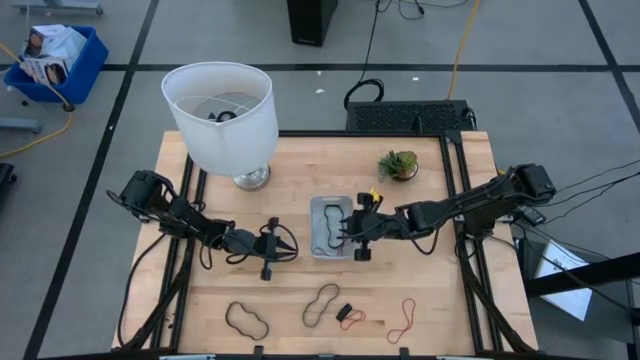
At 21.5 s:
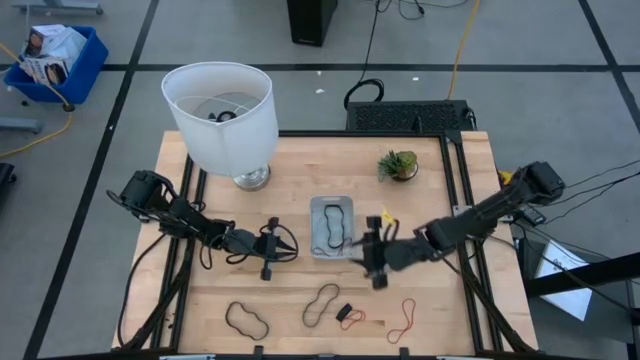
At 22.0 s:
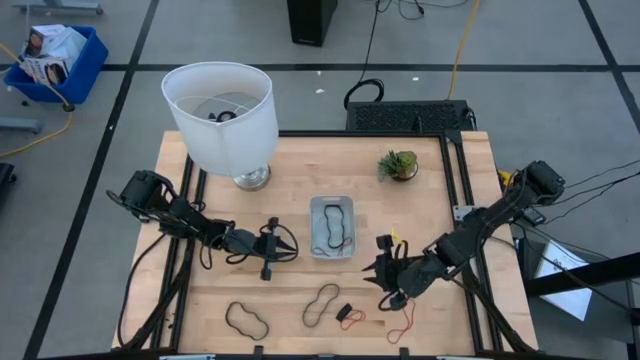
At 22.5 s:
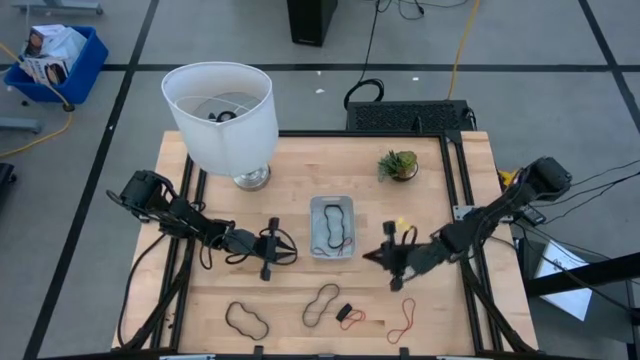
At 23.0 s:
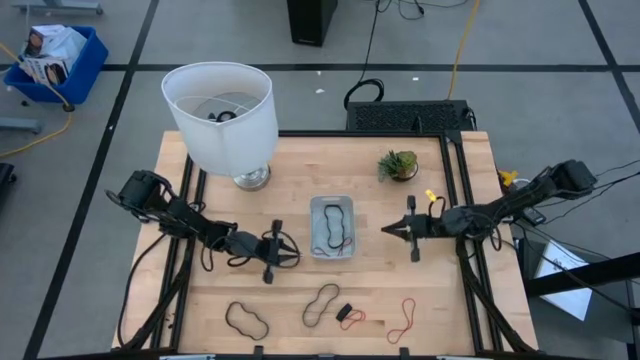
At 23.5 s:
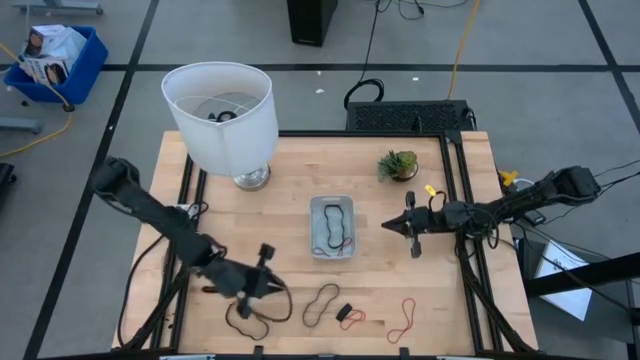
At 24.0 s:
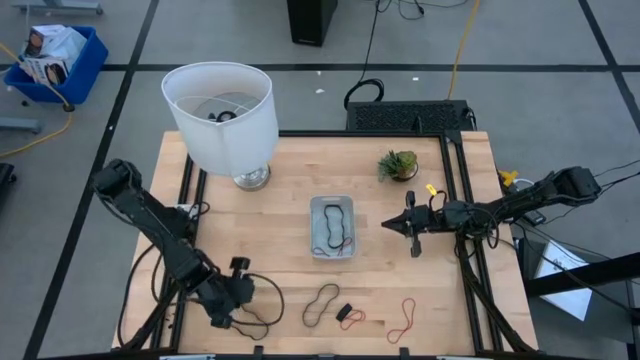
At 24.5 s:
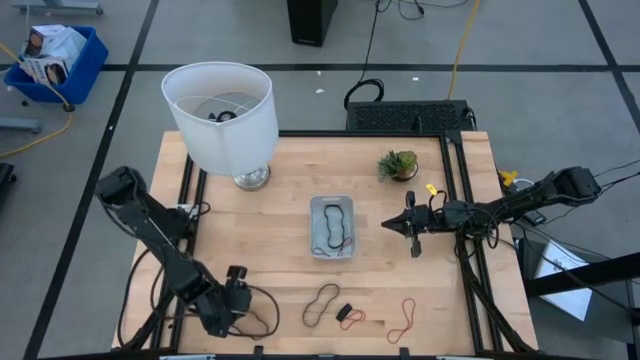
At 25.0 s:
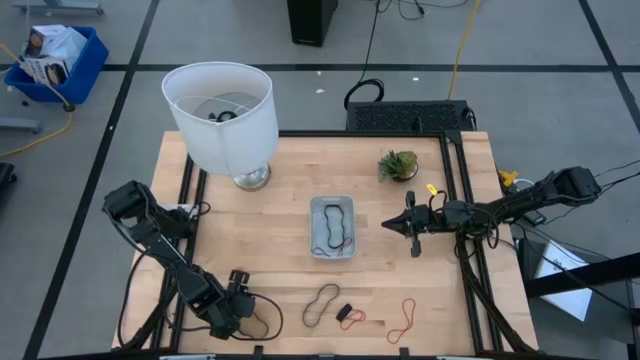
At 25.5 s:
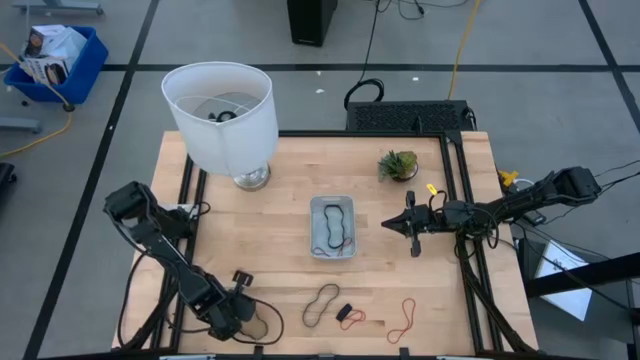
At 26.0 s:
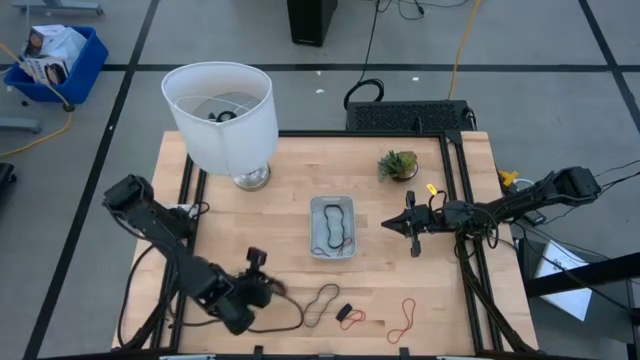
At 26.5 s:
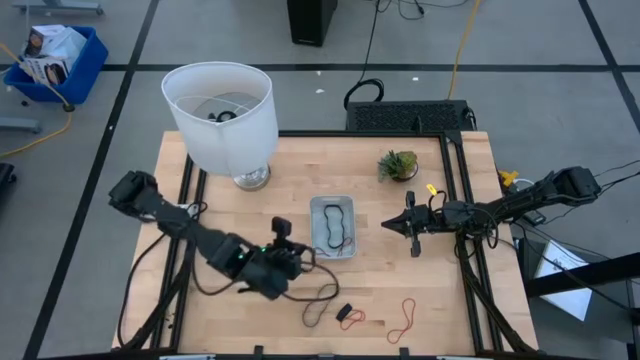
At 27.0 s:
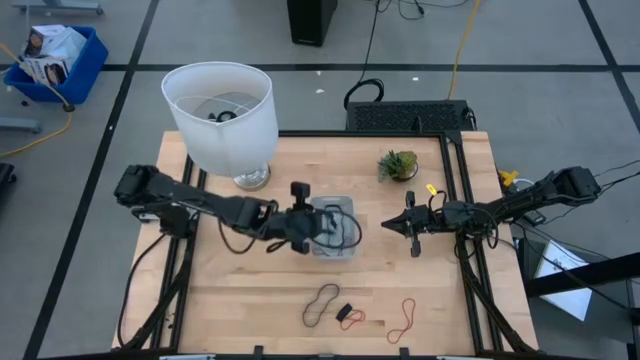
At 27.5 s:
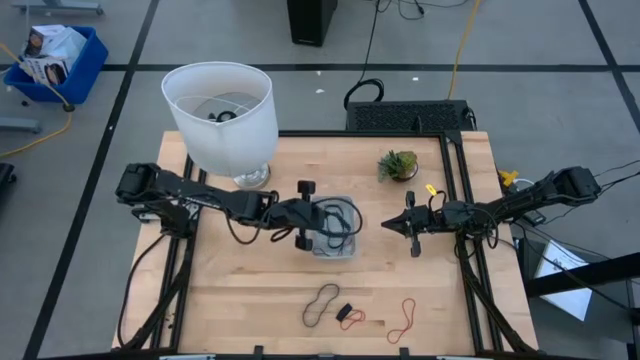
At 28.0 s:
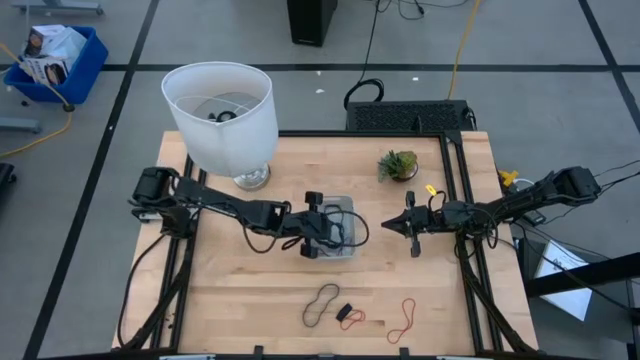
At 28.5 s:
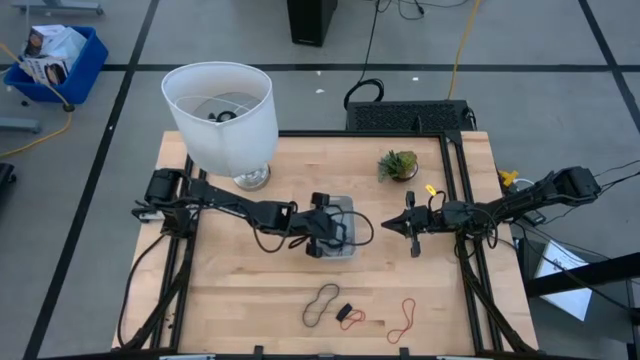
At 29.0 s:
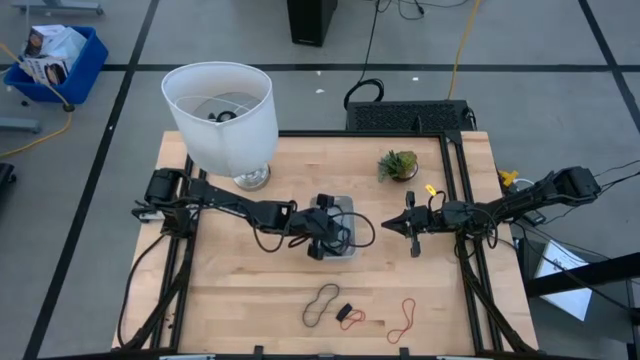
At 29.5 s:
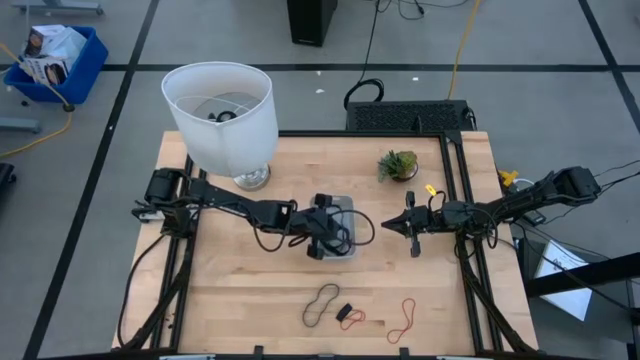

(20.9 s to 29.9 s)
Task: Pick and place rubber bands into bin
Put the black rubber band into the gray bin

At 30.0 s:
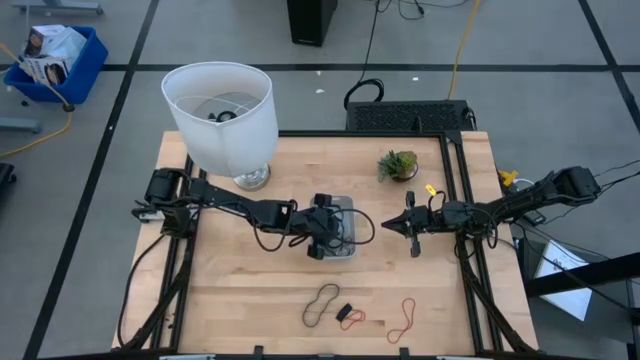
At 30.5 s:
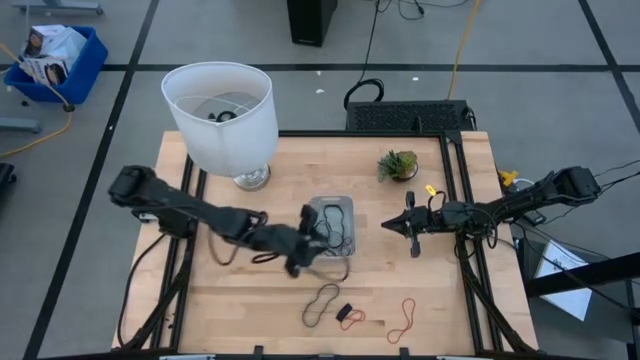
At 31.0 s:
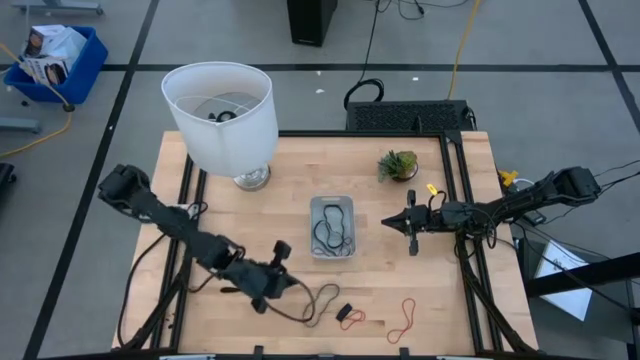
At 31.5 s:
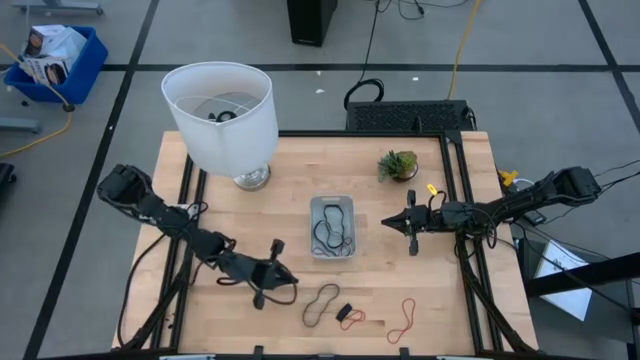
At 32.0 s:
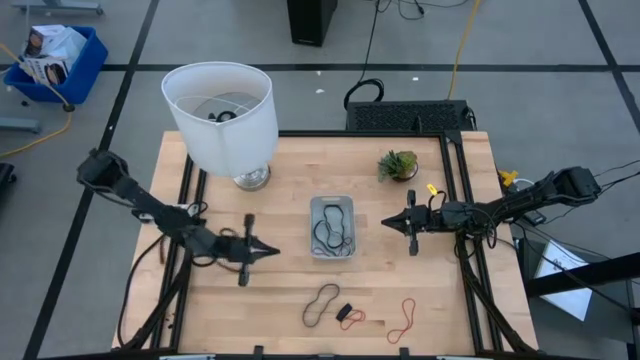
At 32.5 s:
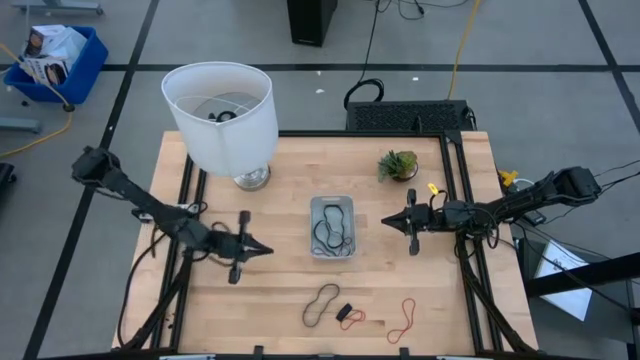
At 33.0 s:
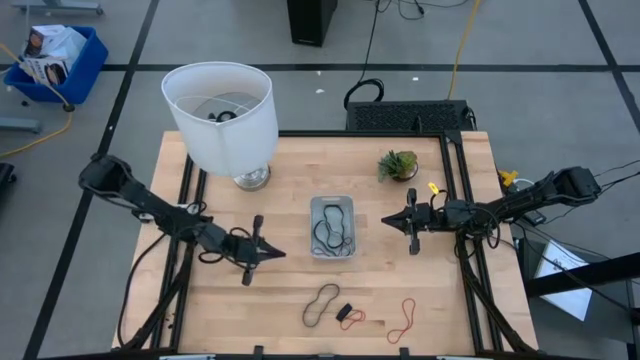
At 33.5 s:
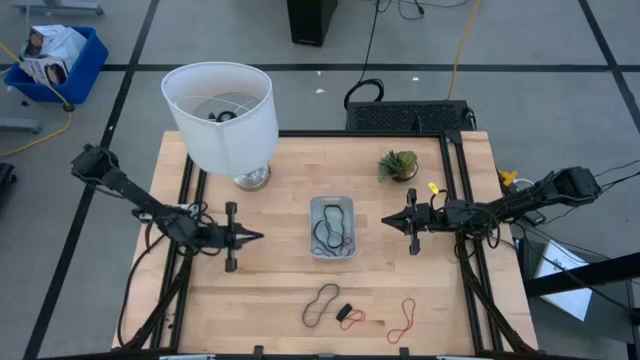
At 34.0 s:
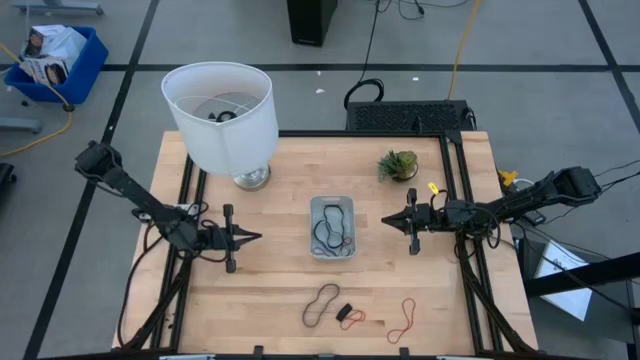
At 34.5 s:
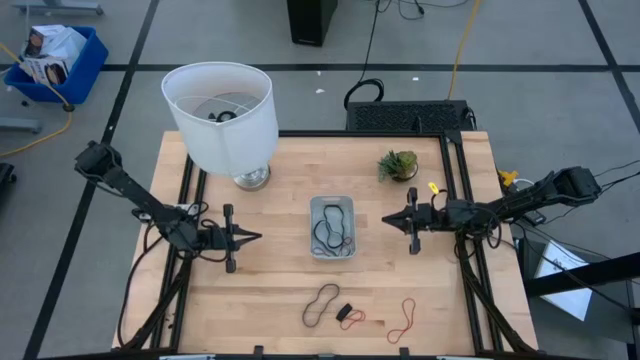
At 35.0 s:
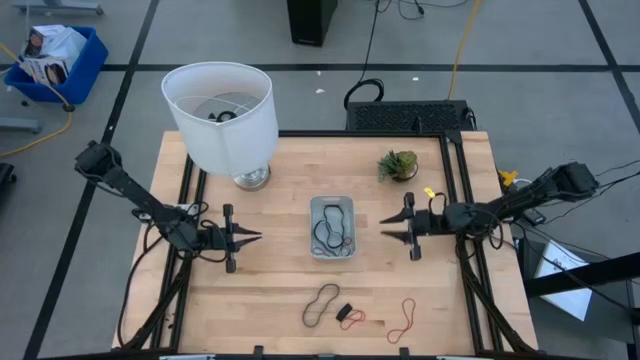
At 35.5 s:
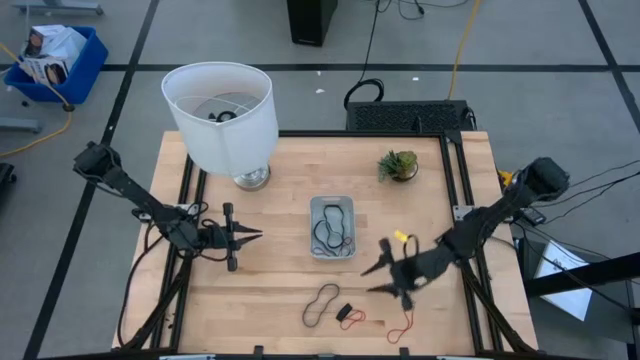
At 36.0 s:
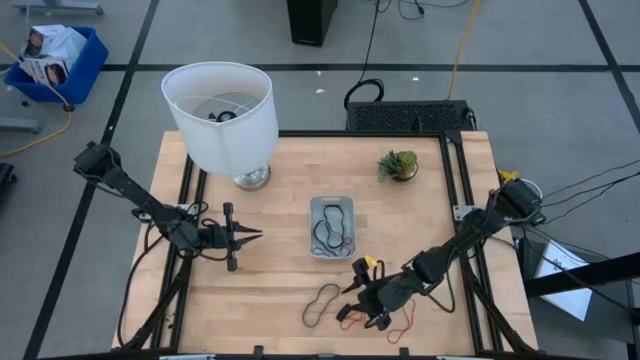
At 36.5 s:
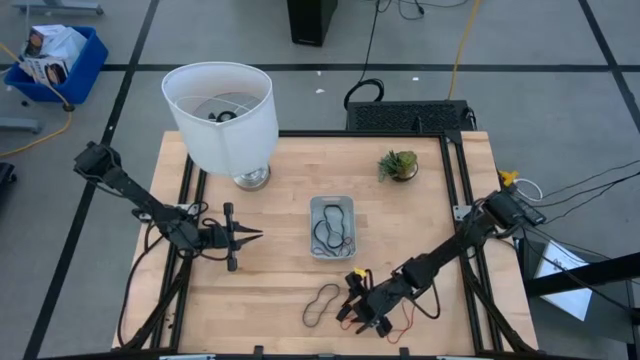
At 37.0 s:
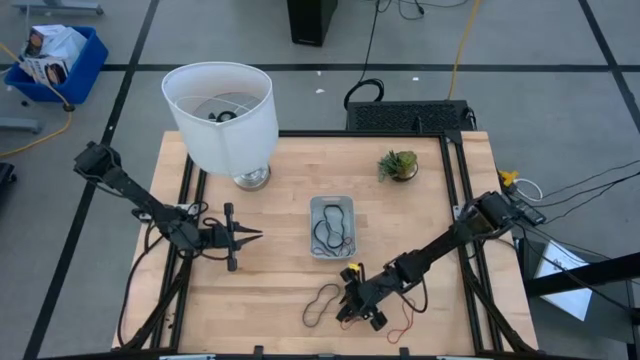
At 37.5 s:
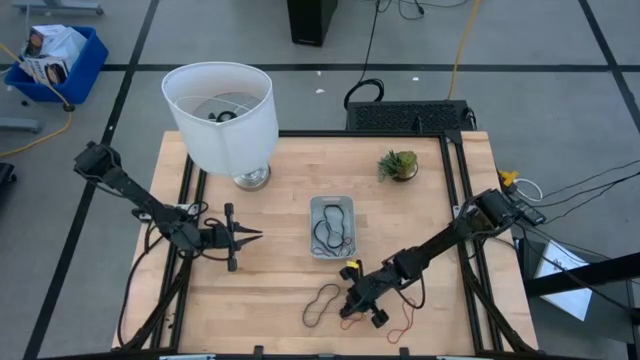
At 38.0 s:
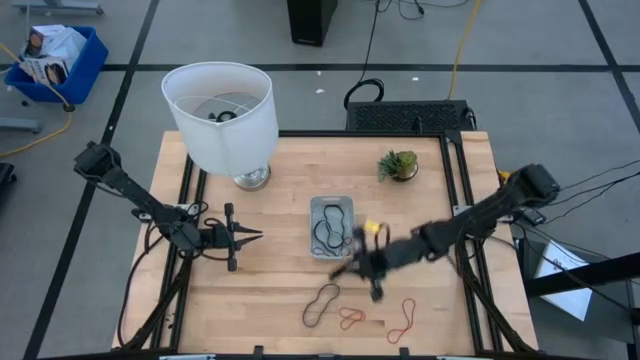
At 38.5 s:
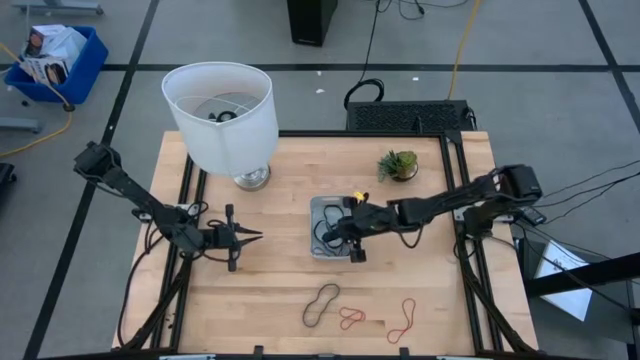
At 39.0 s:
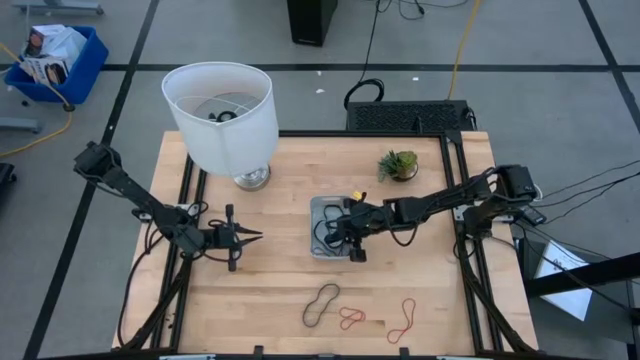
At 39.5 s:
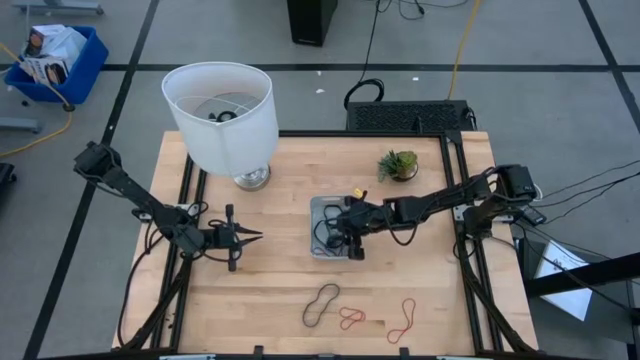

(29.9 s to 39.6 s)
Put the black rubber band into the gray bin

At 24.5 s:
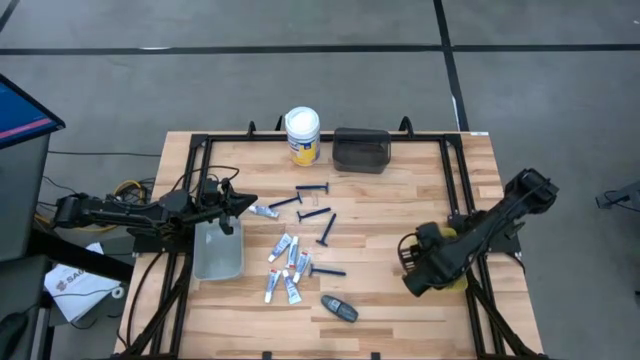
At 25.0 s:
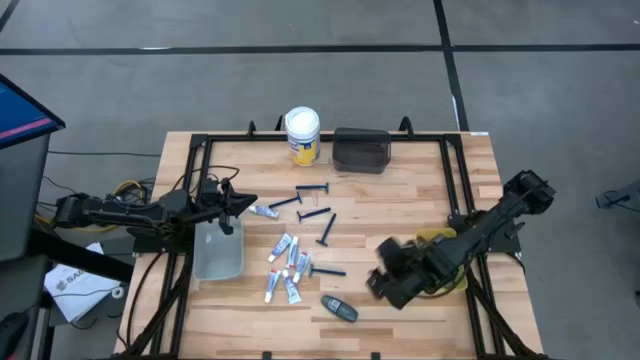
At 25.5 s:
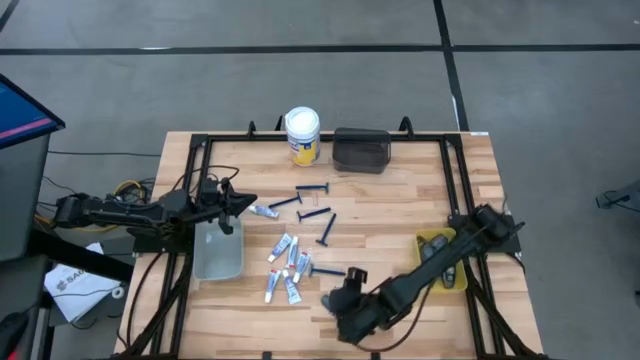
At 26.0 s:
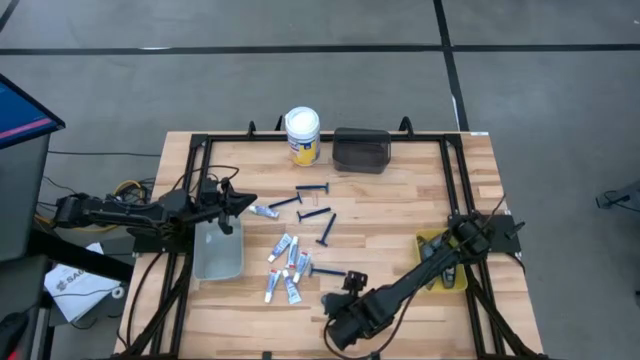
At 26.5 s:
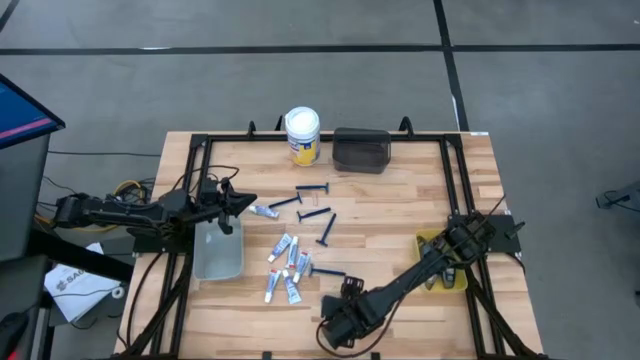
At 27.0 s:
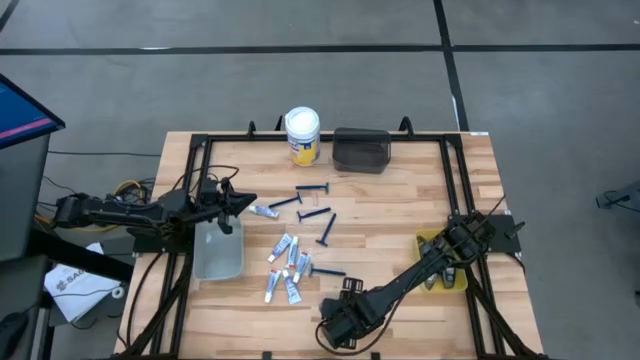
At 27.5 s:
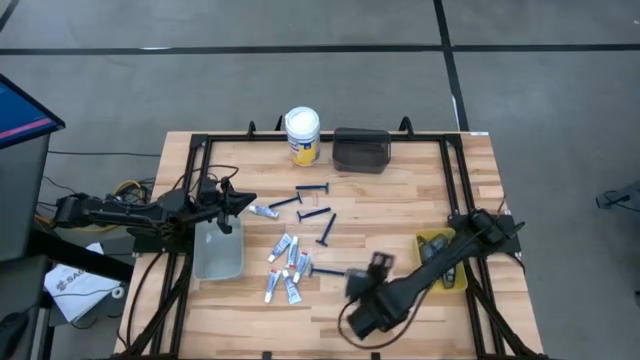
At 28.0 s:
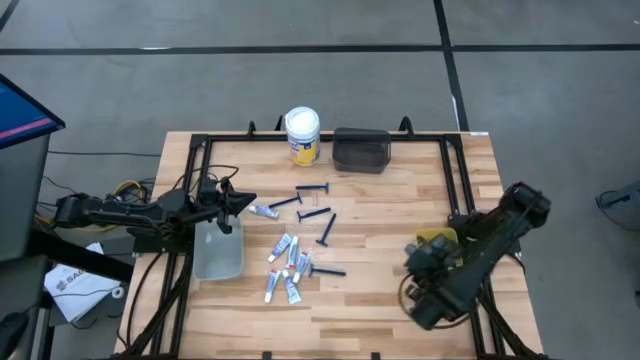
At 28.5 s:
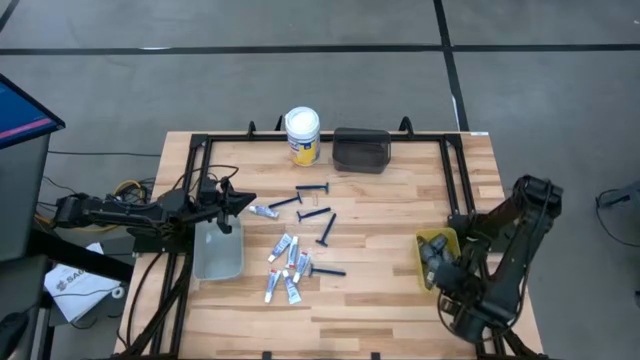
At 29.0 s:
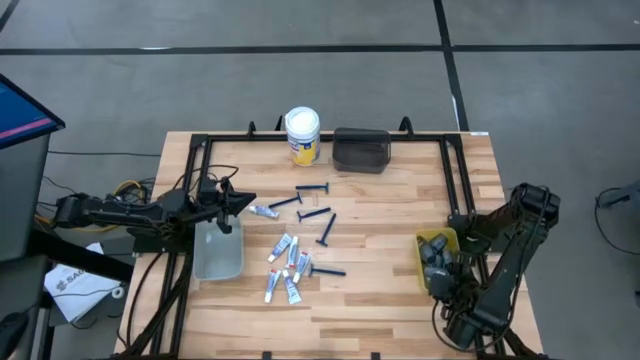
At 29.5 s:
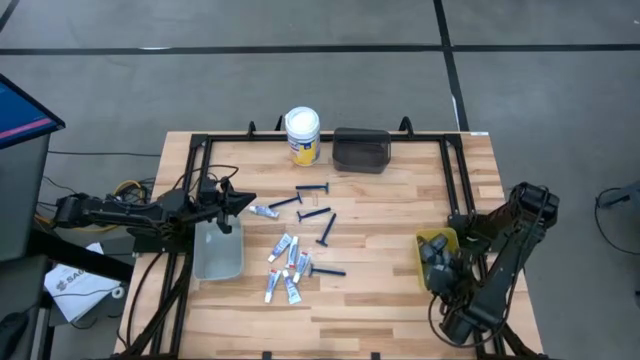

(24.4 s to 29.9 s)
Task: Pick & Place Travel size toiletries
Put the black deodorant into the yellow bin
